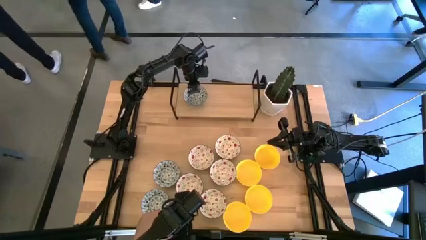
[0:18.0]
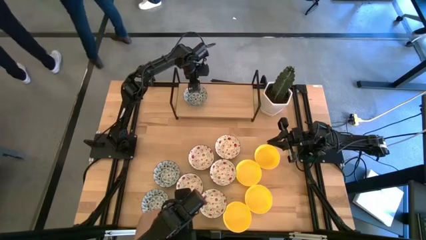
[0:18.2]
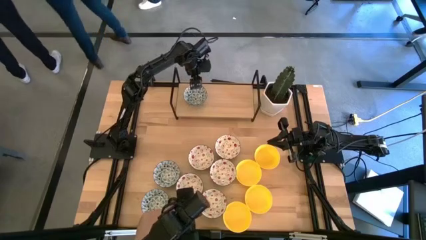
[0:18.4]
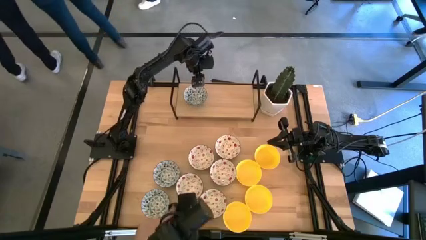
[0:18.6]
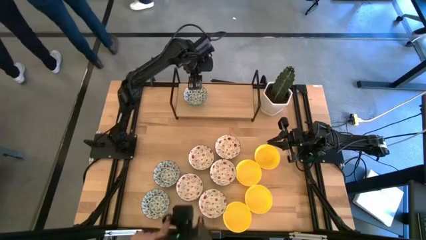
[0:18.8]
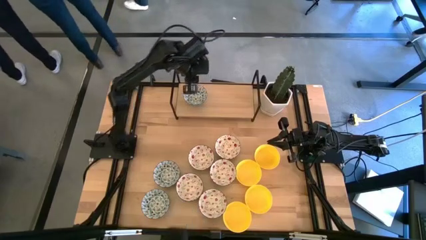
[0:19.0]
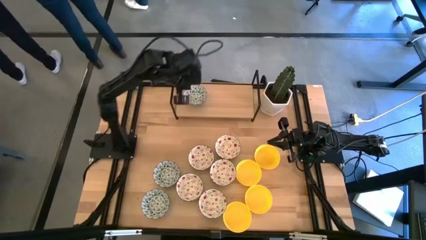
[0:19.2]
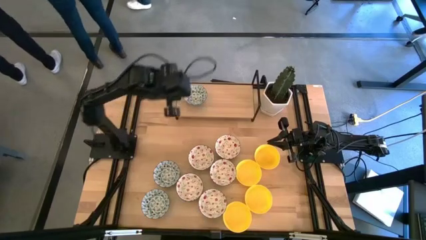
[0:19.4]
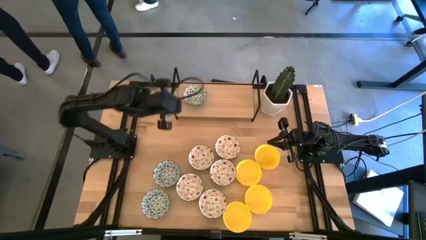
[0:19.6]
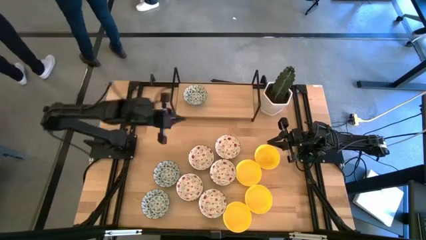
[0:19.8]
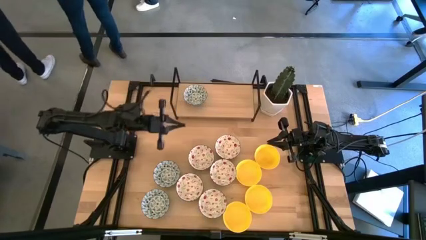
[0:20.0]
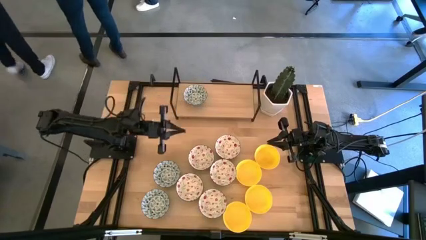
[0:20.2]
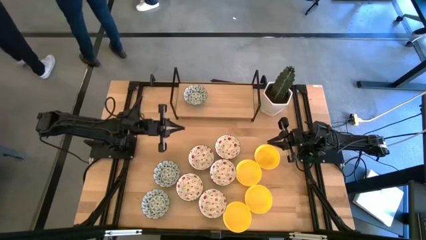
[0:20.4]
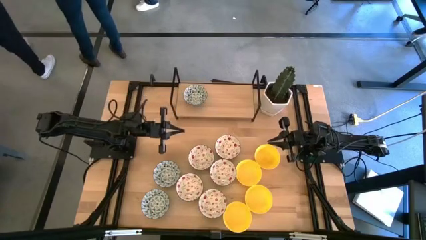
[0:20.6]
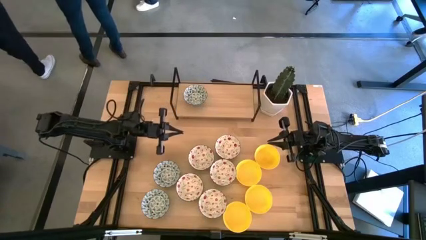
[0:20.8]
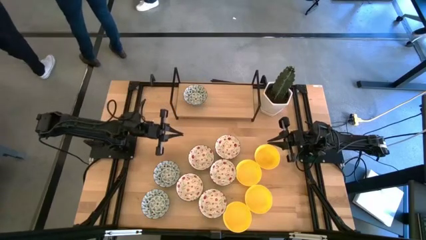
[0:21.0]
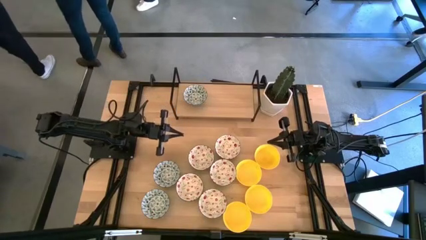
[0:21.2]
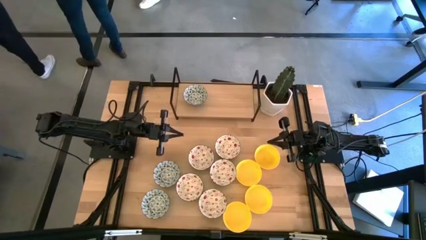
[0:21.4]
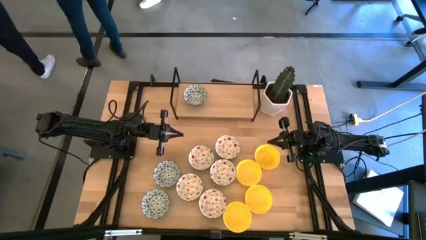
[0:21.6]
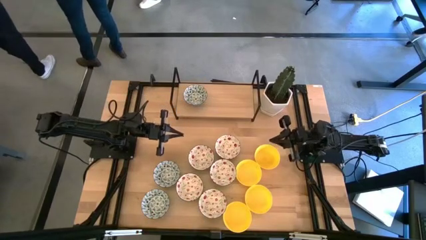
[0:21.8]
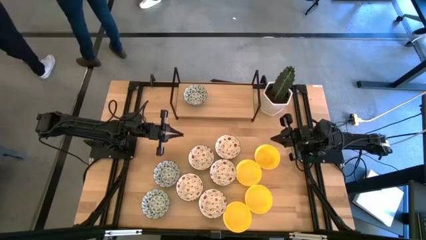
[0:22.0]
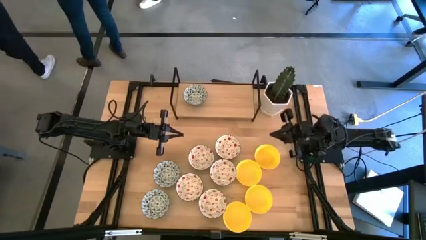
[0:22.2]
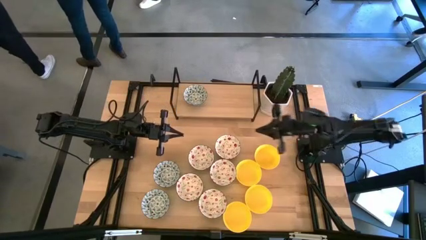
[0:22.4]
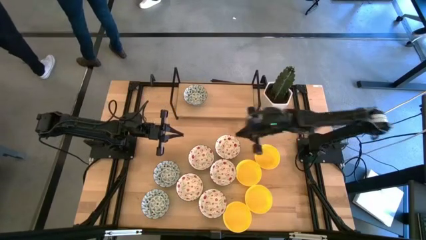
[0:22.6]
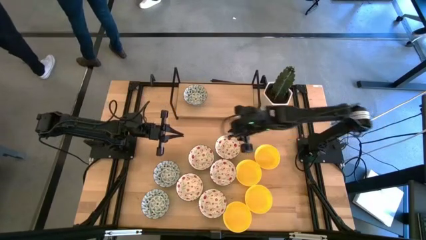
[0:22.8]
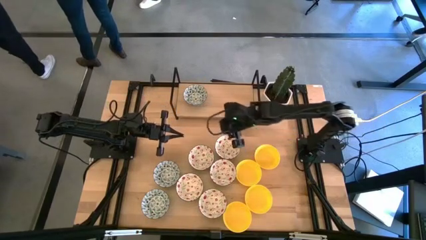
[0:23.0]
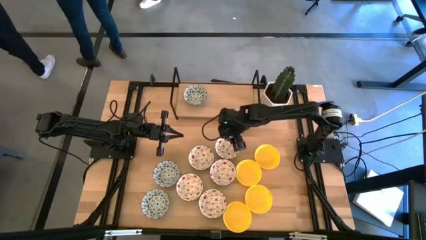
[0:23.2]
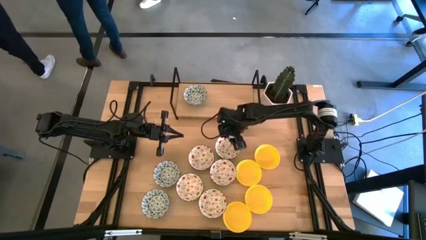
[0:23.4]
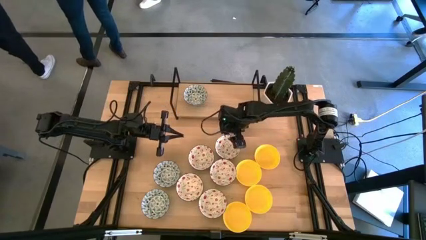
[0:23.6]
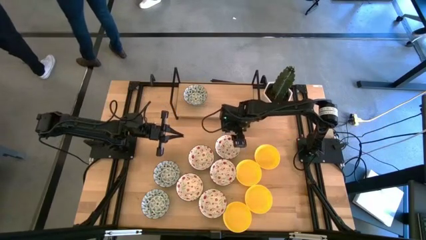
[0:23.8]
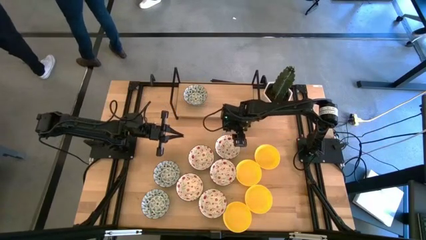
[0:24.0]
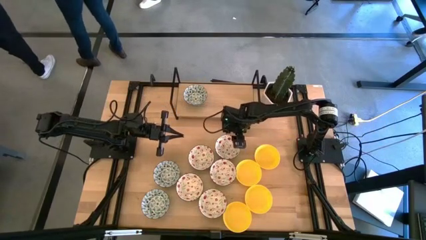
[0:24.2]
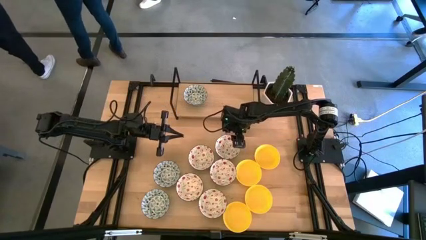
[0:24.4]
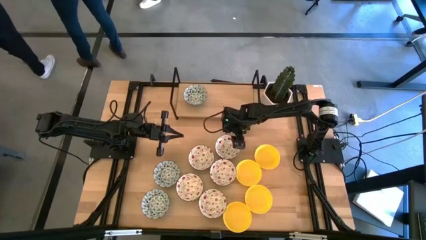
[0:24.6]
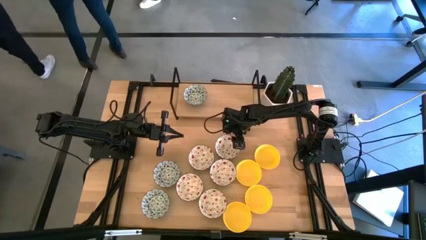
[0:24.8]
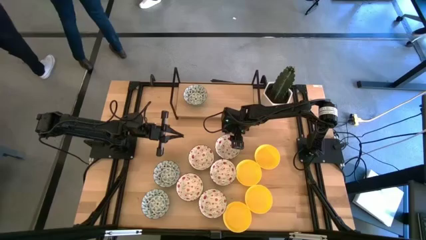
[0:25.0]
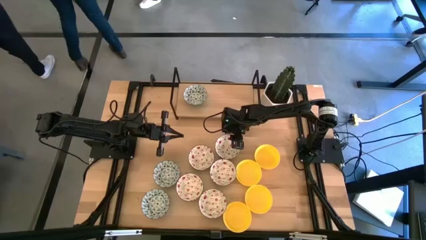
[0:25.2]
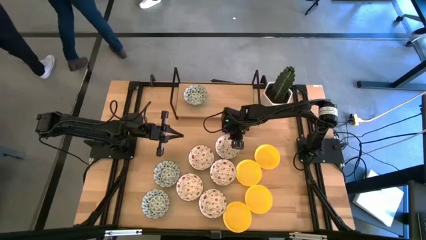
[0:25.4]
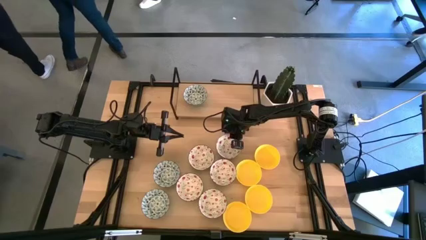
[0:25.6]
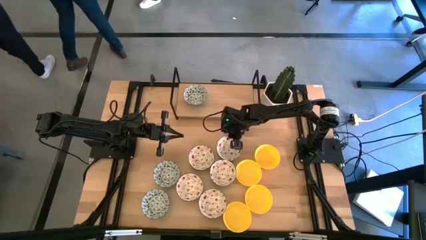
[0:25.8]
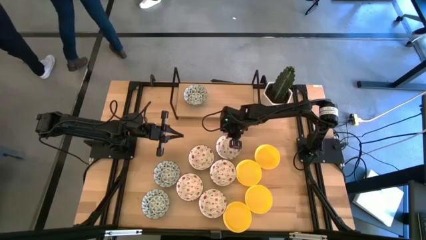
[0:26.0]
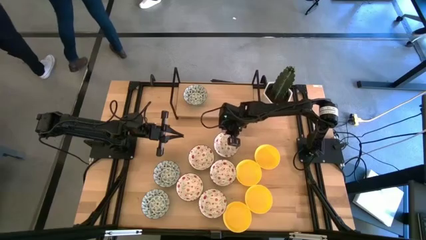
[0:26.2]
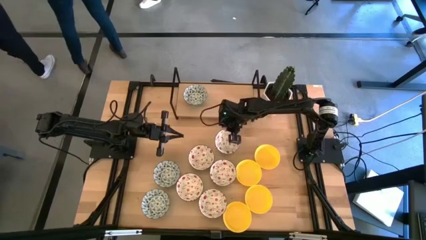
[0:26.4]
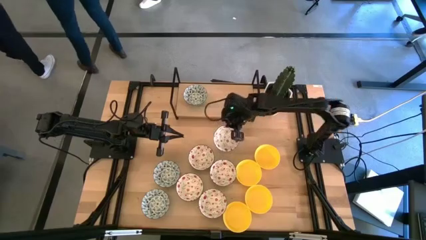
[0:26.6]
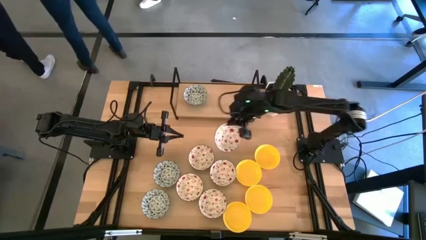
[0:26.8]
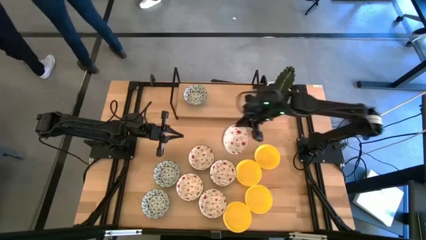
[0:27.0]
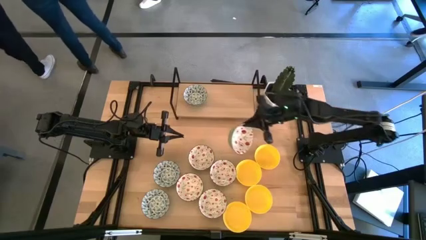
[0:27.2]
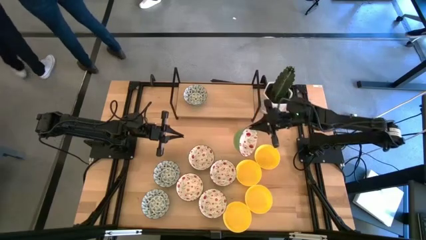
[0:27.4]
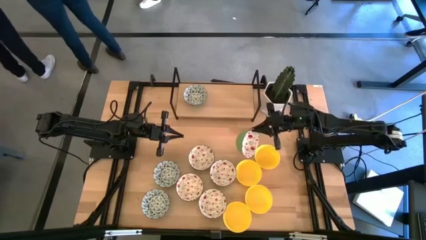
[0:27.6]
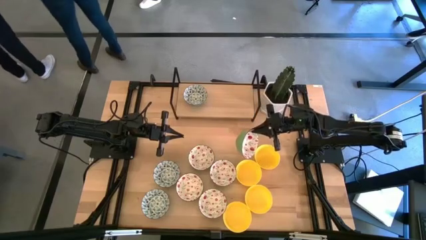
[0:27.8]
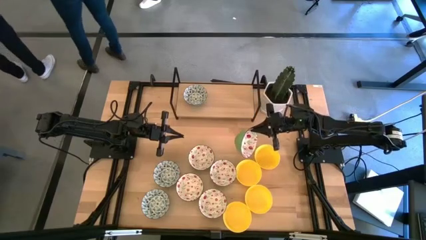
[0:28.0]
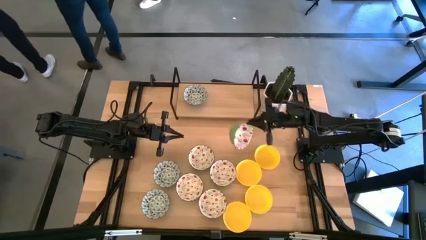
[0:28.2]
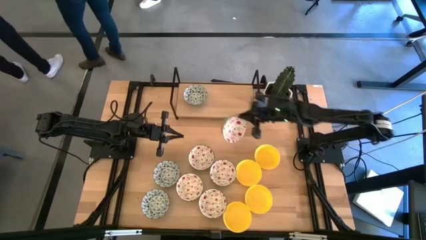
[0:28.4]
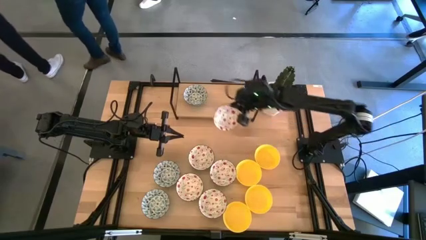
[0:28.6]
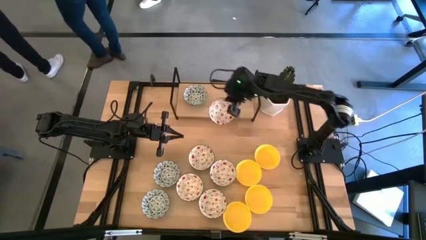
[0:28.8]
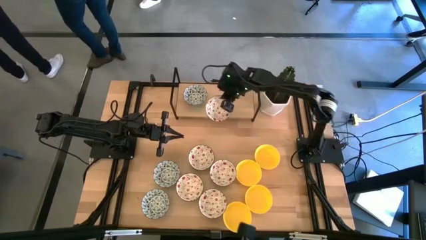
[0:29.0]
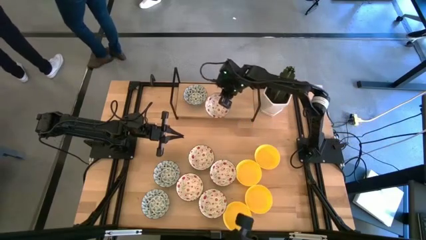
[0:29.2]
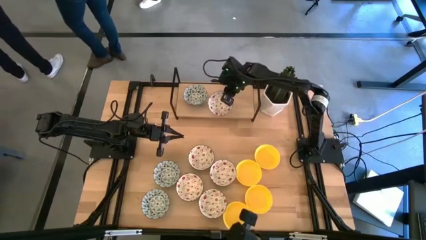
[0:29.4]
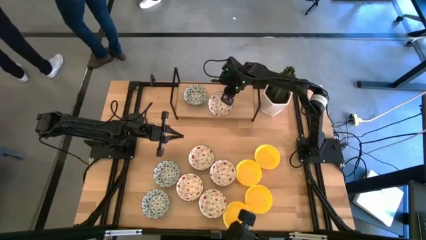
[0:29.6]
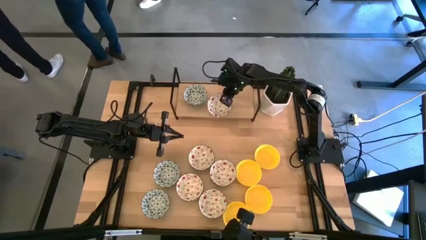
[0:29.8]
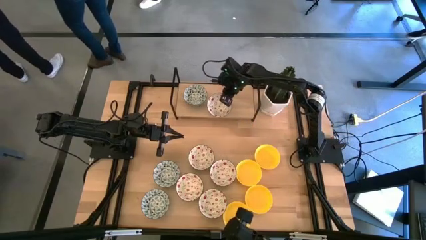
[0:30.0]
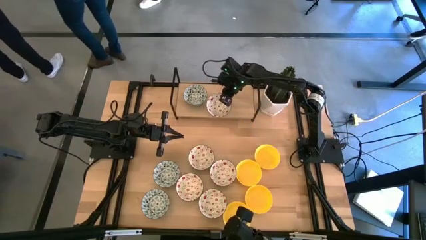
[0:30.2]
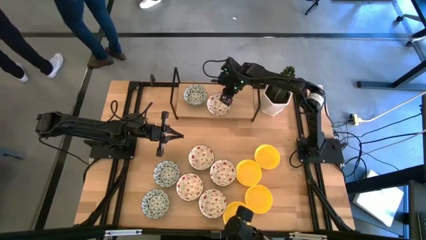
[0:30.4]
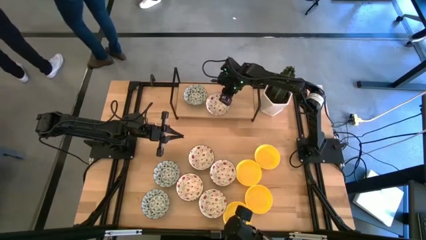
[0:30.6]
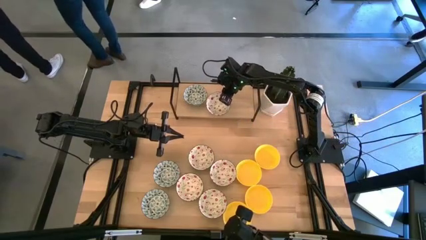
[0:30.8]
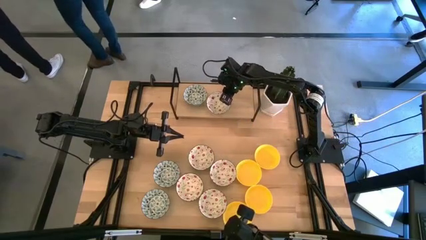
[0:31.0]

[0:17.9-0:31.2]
Task: Pick & Place Mini bowls
Put the red patterned bowl on the shelf

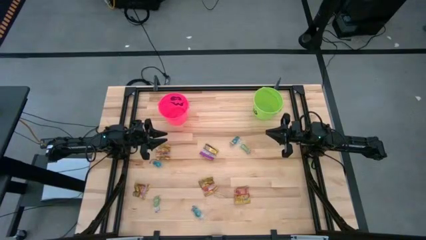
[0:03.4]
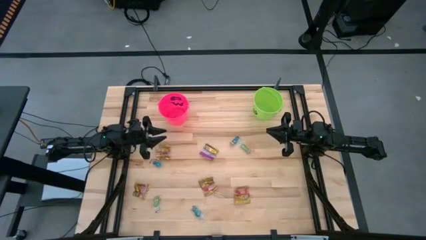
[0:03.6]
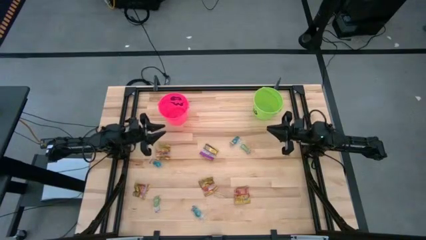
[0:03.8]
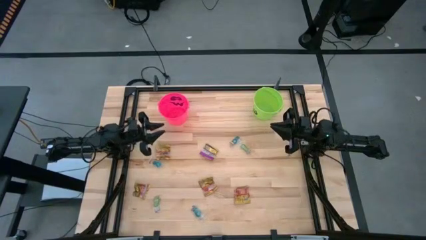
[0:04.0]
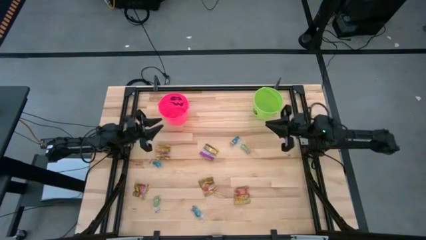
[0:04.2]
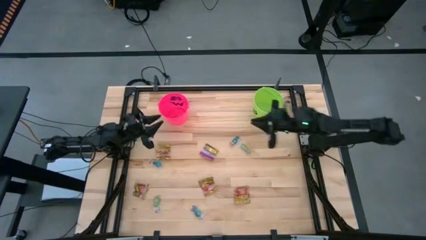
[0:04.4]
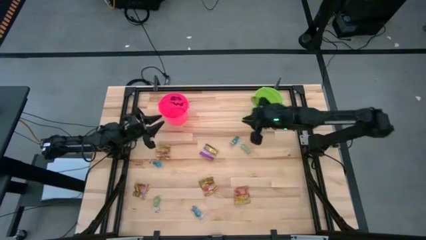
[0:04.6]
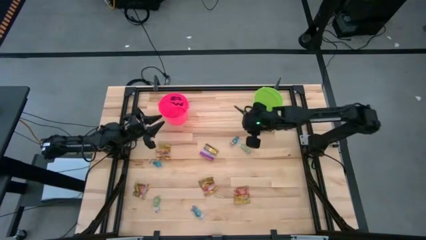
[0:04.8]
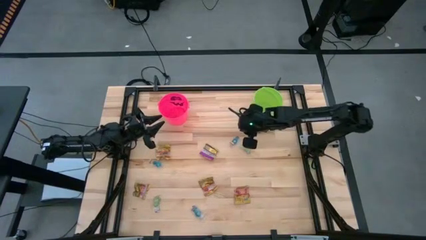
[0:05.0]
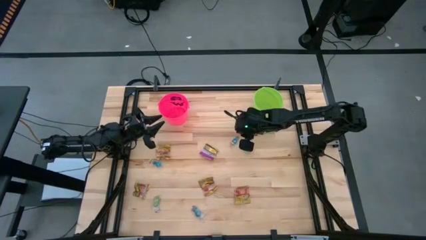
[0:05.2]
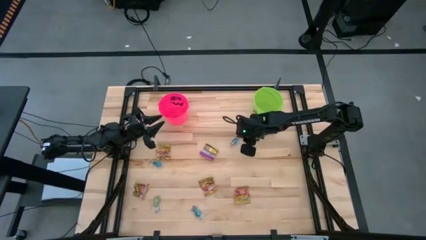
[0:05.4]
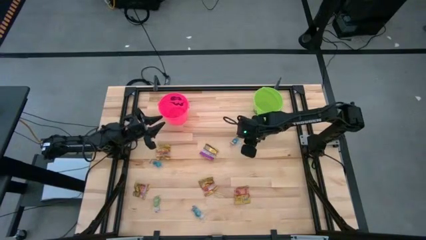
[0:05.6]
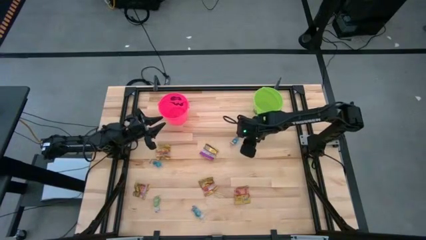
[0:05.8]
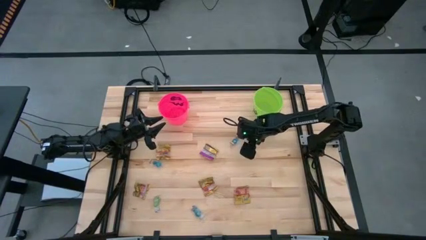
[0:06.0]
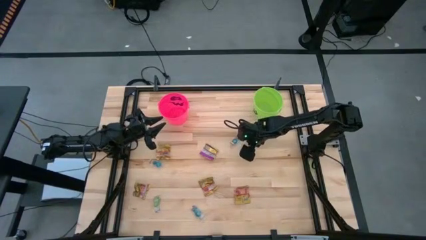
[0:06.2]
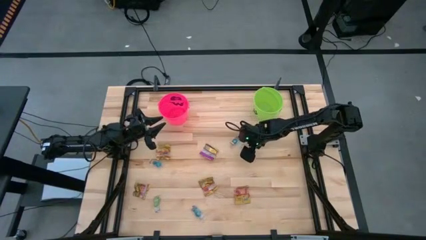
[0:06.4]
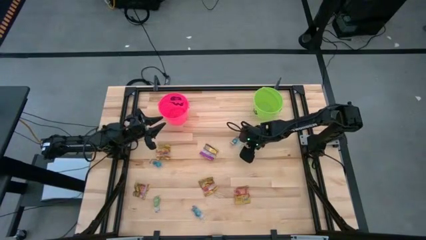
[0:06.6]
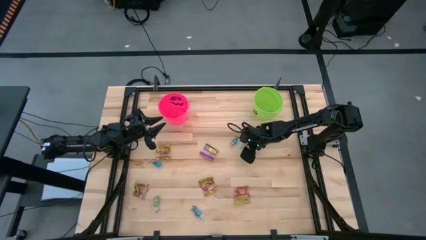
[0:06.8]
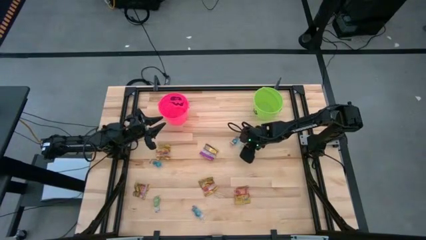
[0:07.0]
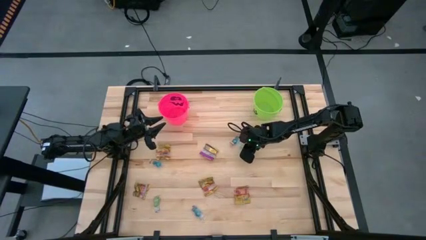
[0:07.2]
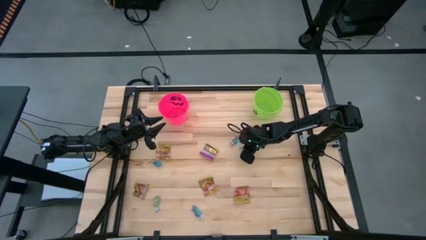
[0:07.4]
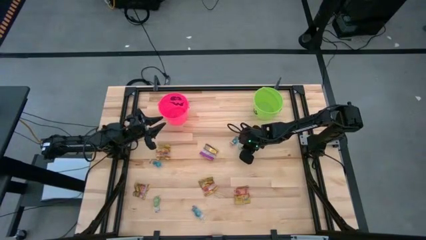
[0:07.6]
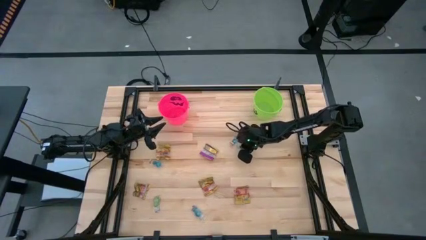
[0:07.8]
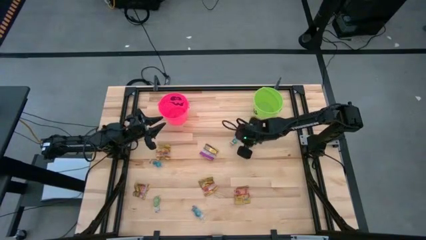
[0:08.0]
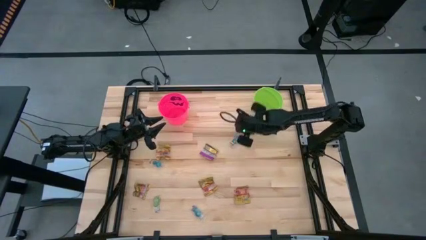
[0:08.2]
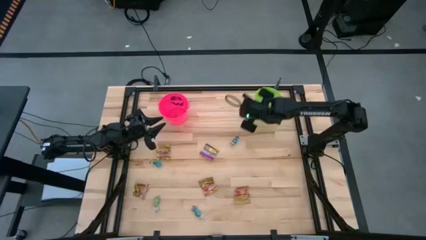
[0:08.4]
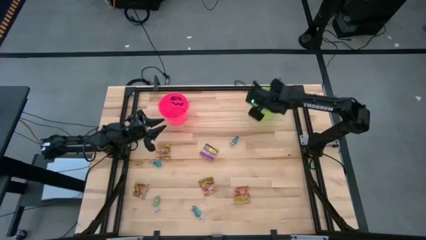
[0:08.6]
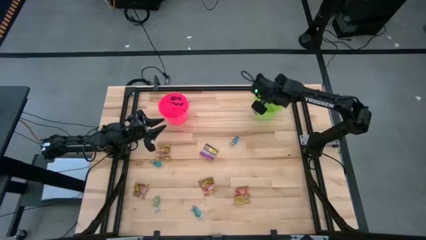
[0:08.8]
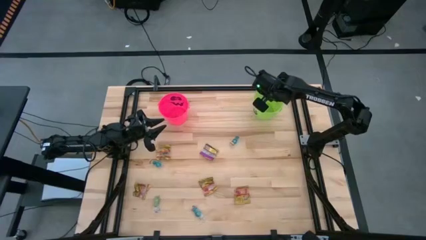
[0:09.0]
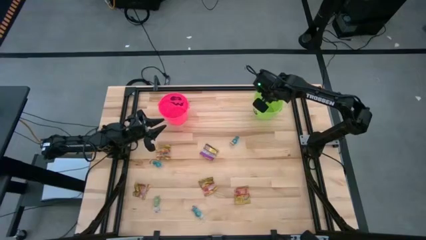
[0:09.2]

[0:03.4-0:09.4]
Task: Sort candy by brand, put in halloween buckets
Put the green candy into the green bucket
